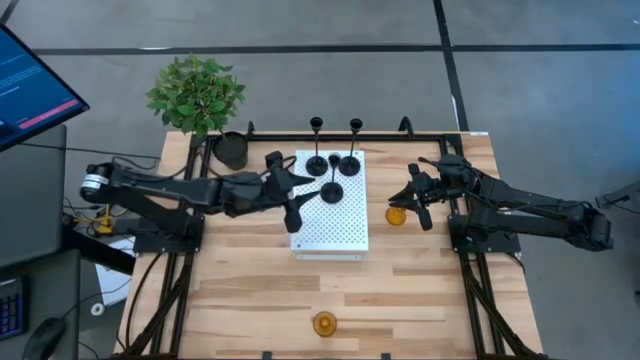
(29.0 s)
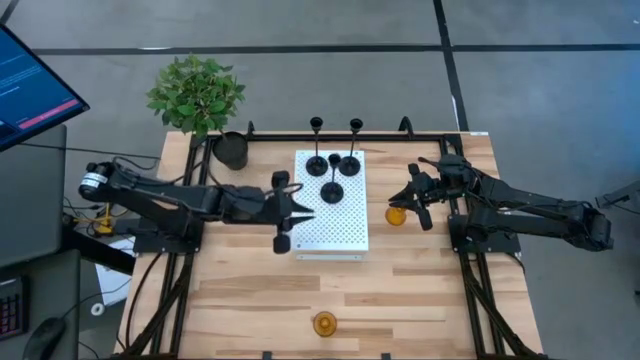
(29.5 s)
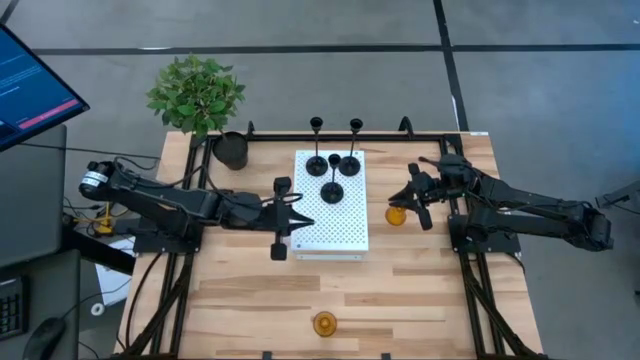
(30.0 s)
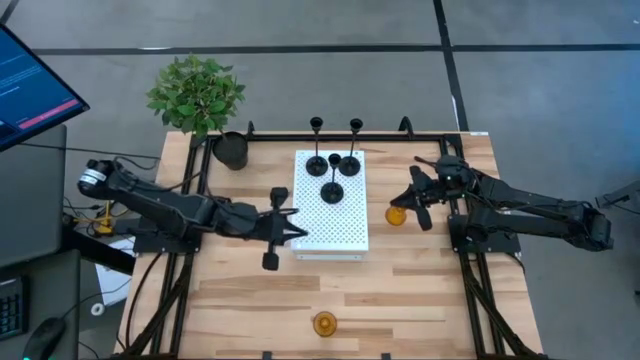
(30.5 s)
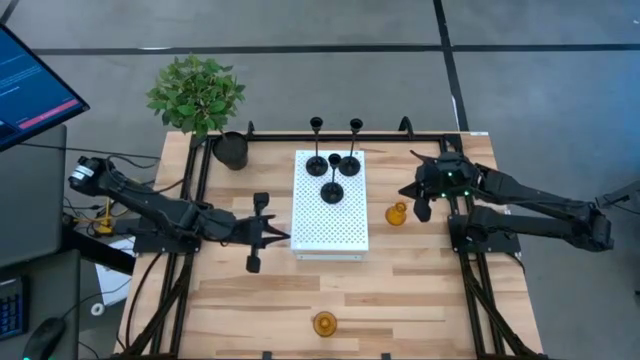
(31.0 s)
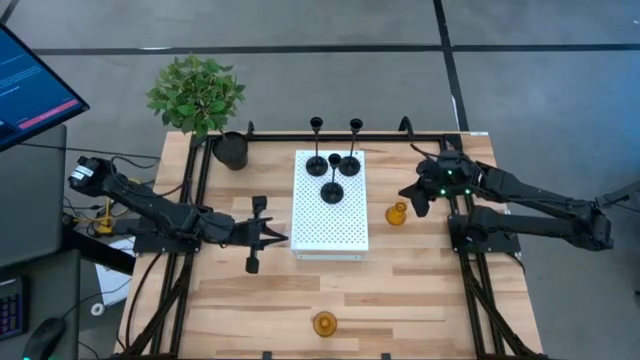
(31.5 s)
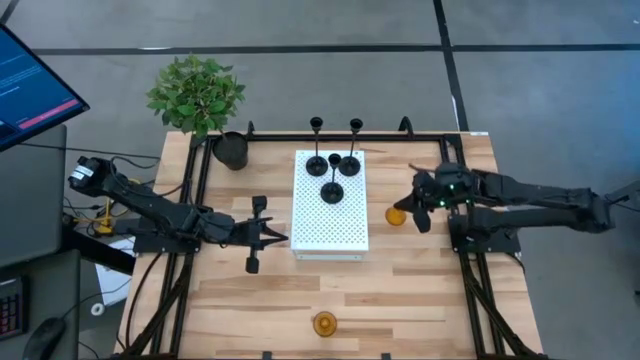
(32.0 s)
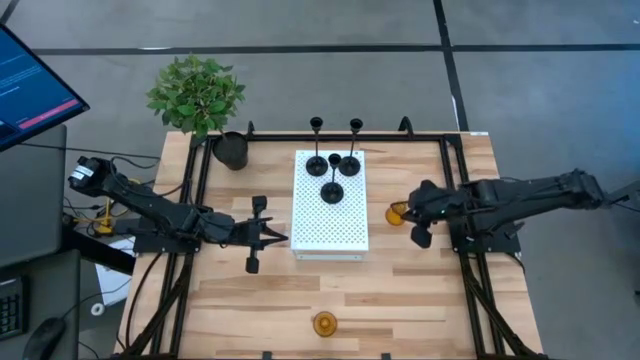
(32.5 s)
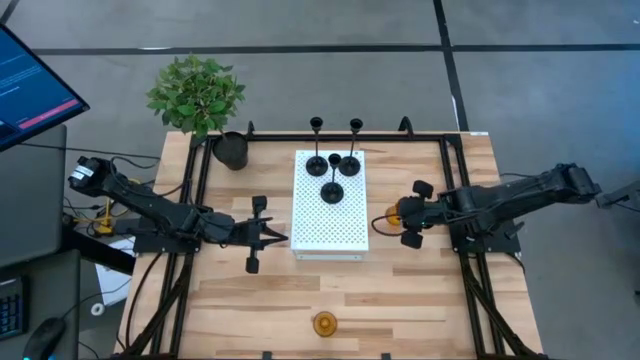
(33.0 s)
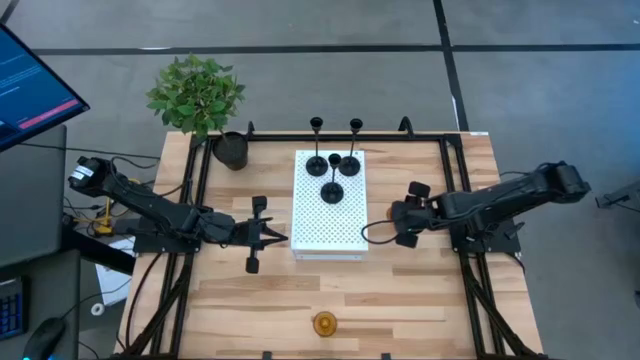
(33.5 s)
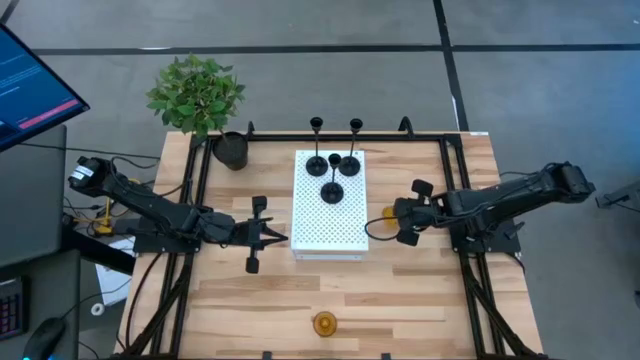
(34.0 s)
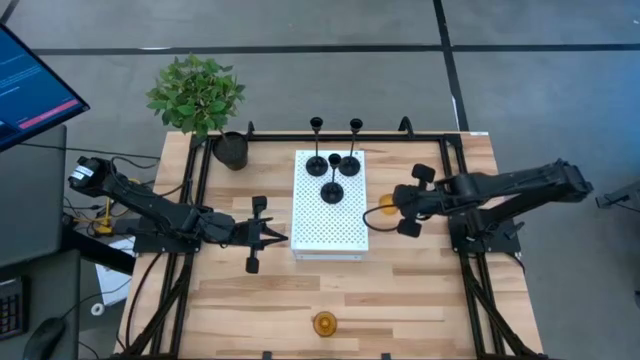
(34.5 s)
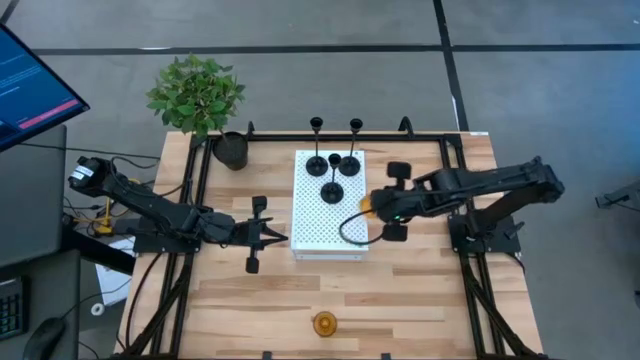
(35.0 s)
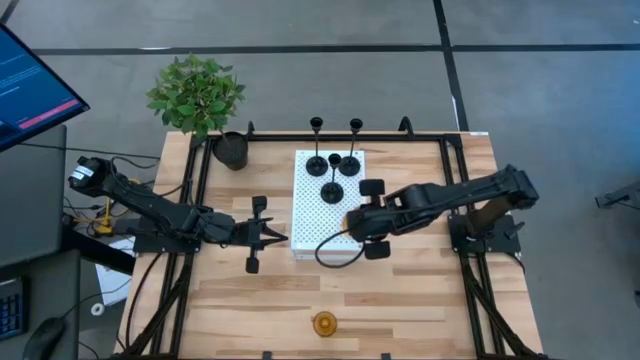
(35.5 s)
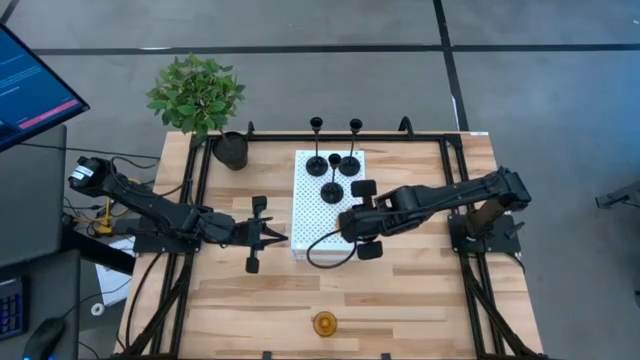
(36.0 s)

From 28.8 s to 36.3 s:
Task: Pick & Place candle stick holders
Put the top yellow glass candle holder on the shelf

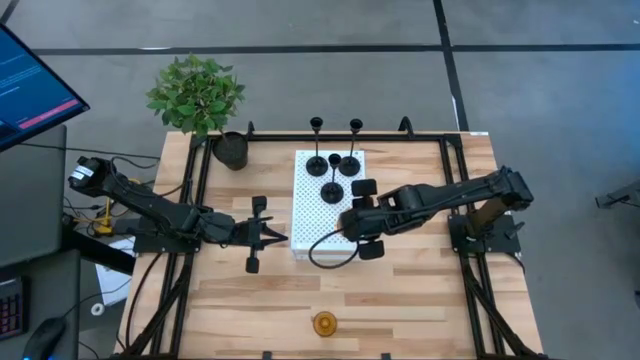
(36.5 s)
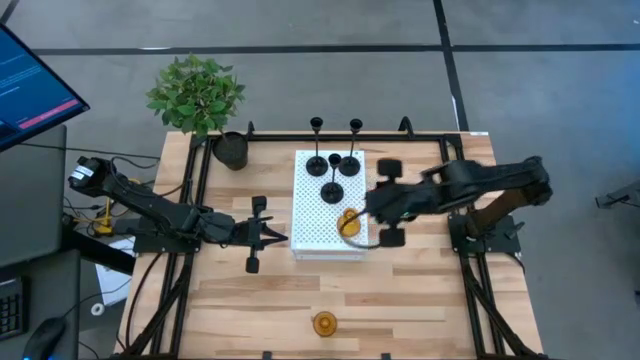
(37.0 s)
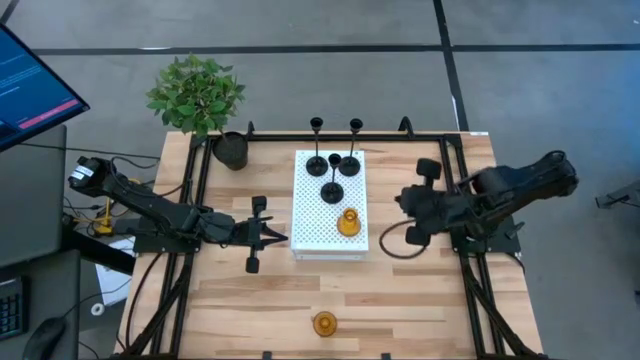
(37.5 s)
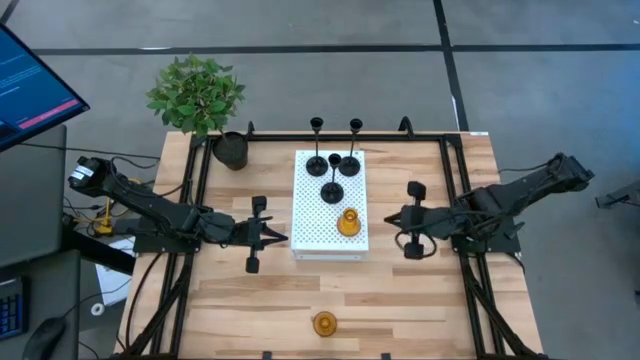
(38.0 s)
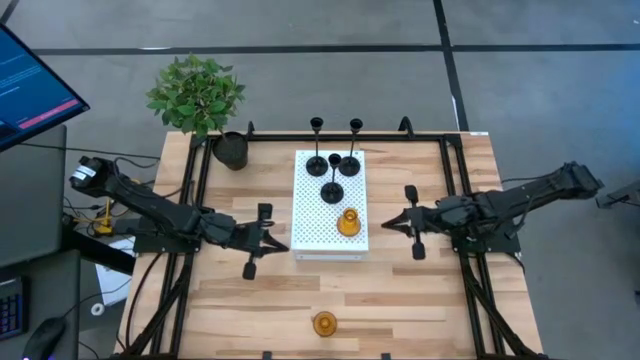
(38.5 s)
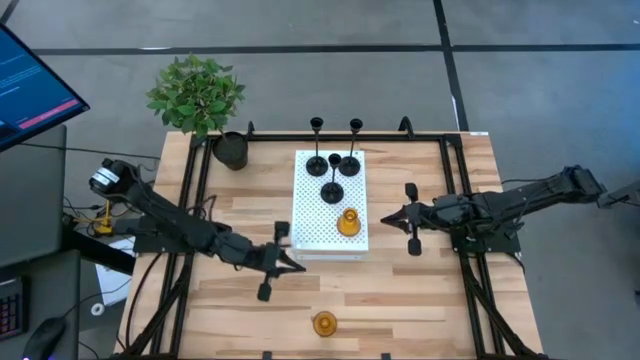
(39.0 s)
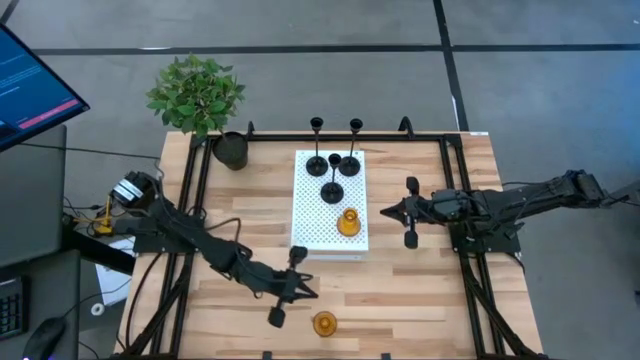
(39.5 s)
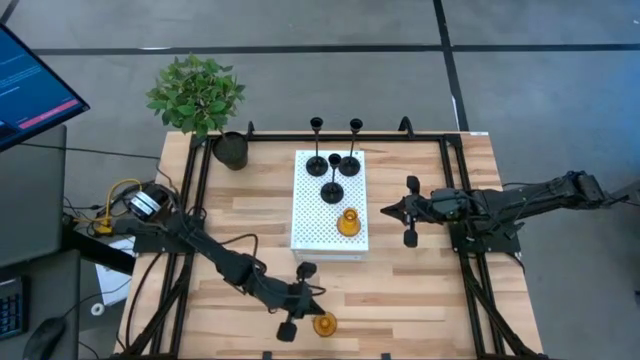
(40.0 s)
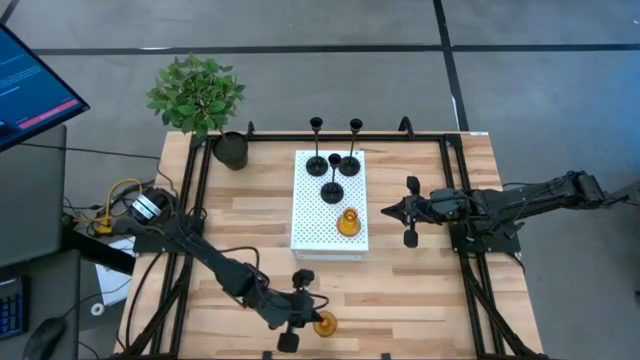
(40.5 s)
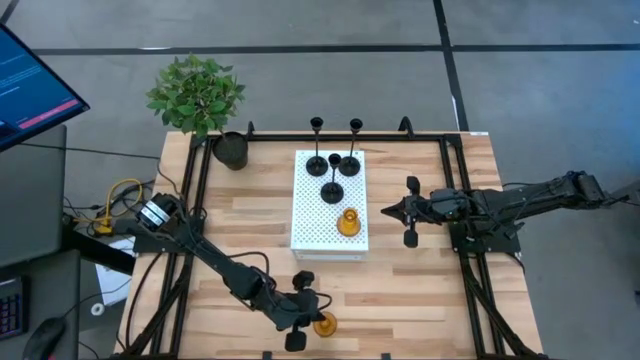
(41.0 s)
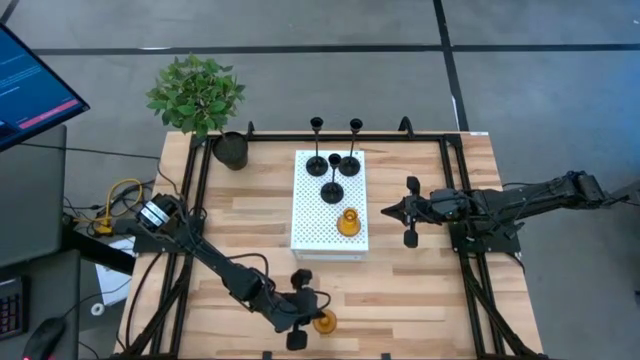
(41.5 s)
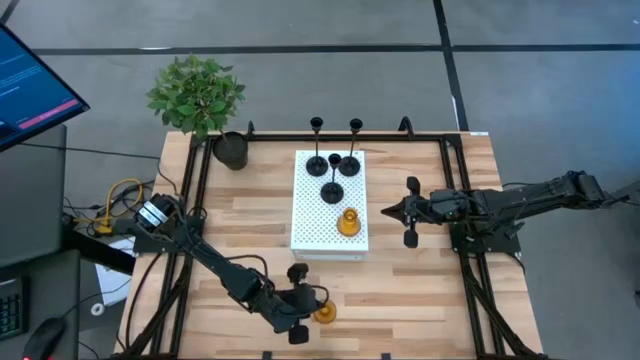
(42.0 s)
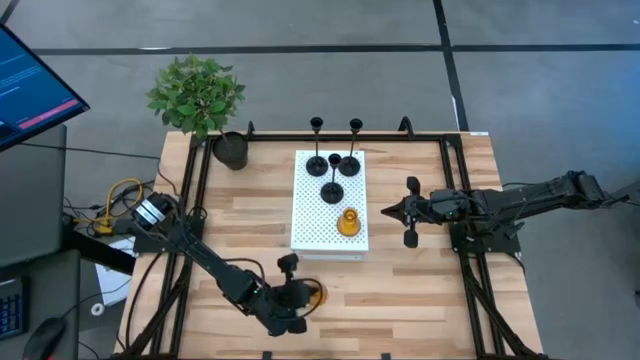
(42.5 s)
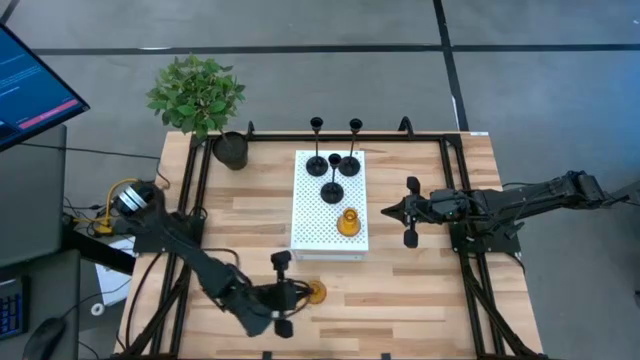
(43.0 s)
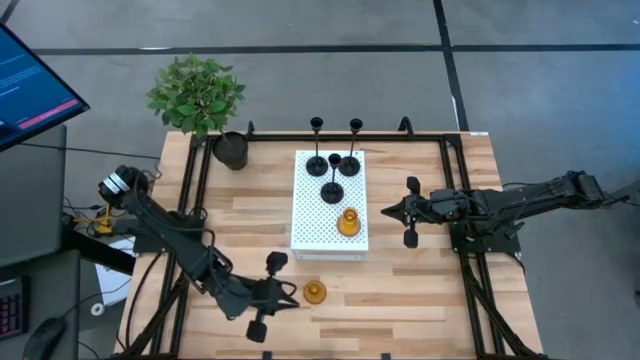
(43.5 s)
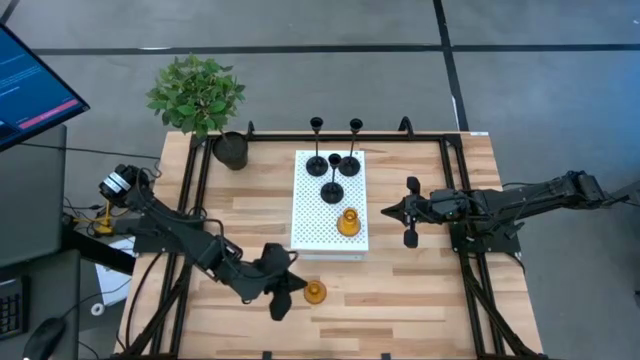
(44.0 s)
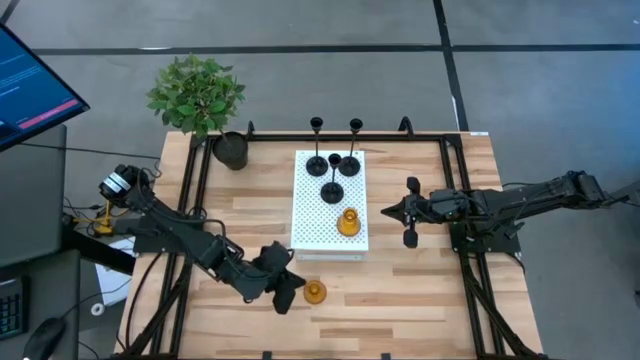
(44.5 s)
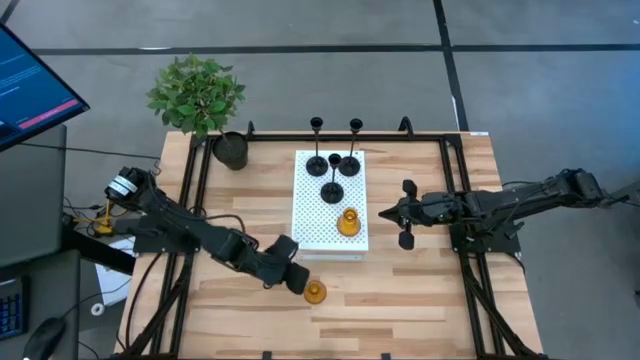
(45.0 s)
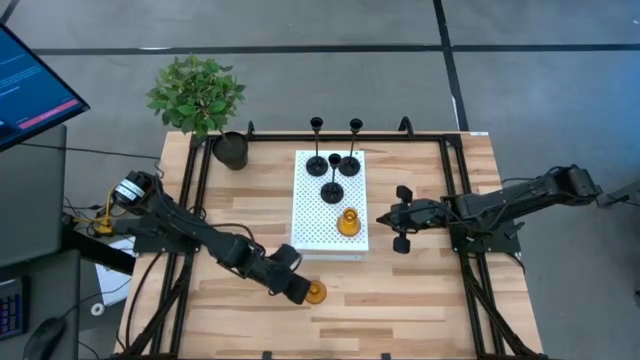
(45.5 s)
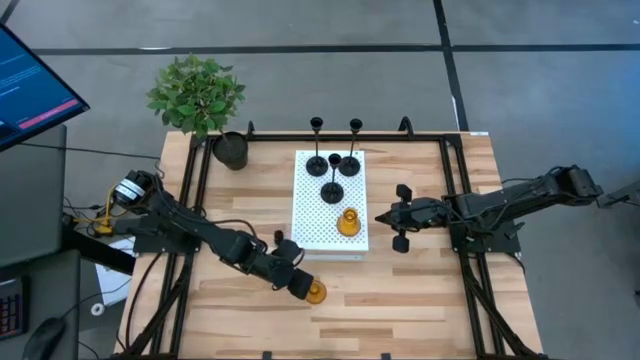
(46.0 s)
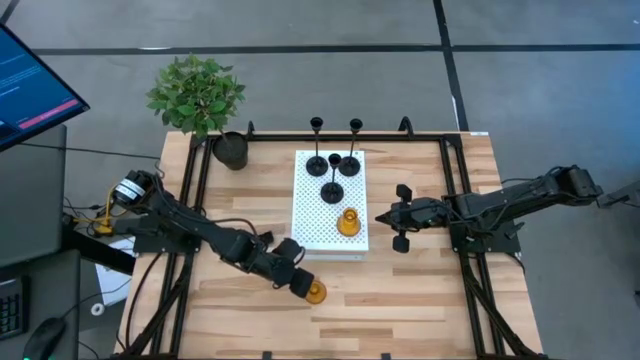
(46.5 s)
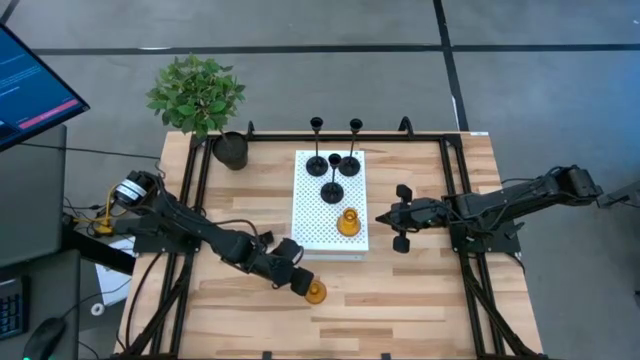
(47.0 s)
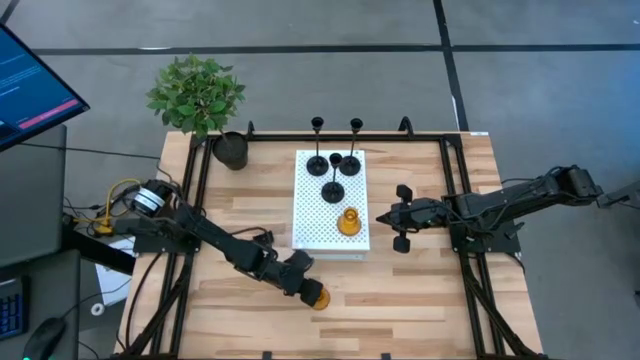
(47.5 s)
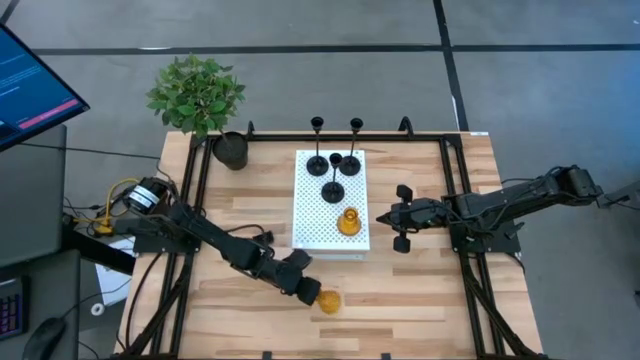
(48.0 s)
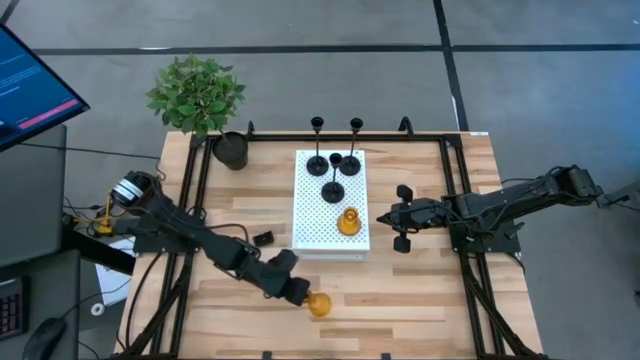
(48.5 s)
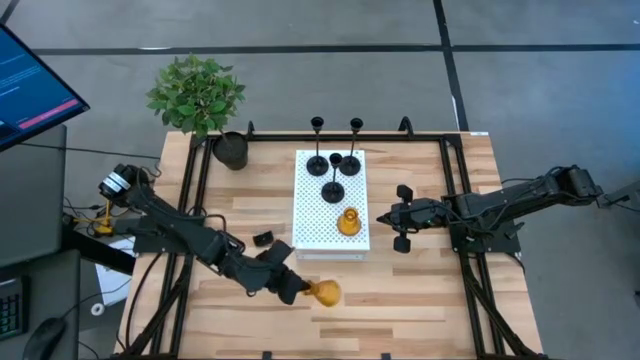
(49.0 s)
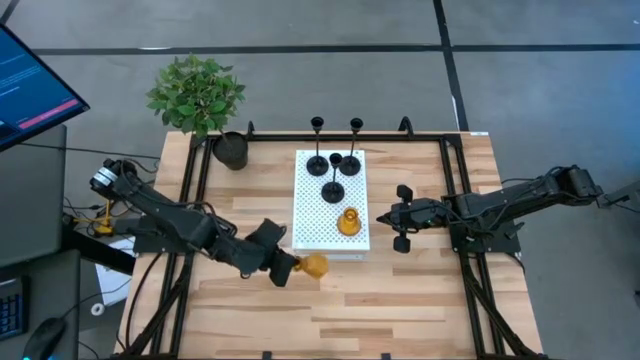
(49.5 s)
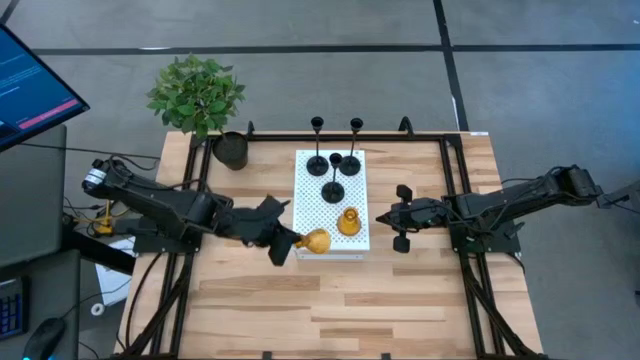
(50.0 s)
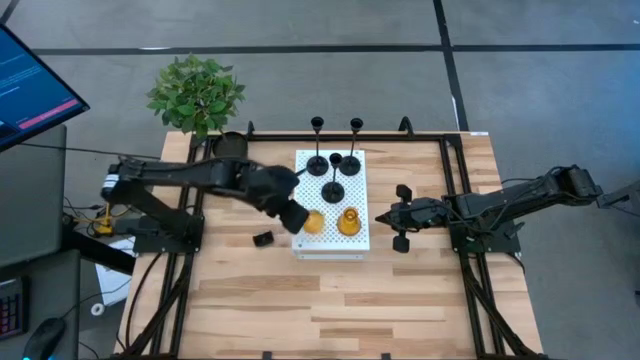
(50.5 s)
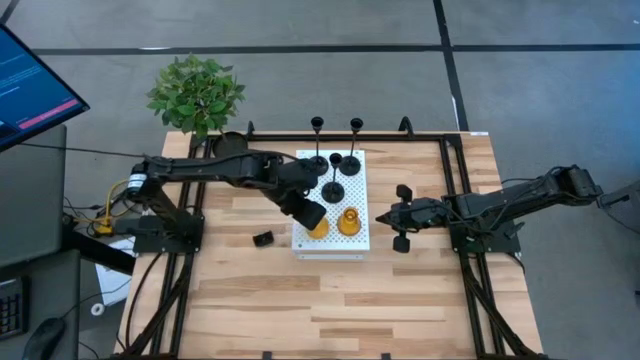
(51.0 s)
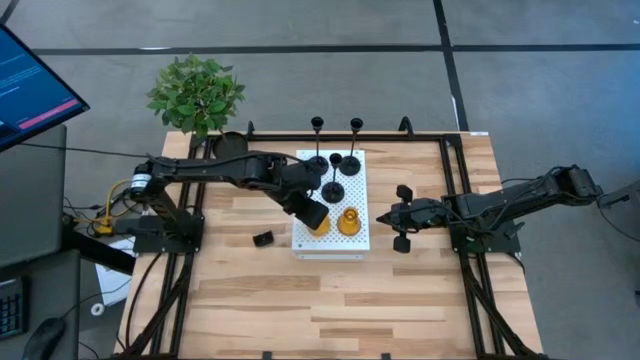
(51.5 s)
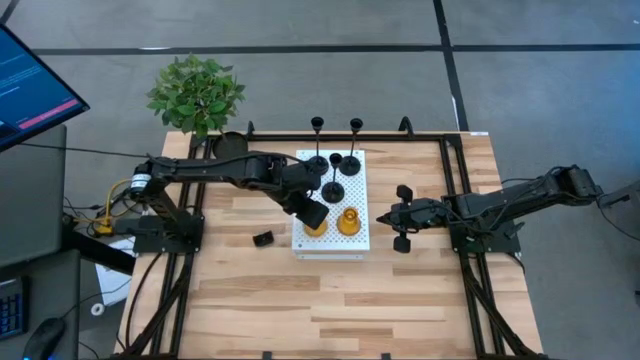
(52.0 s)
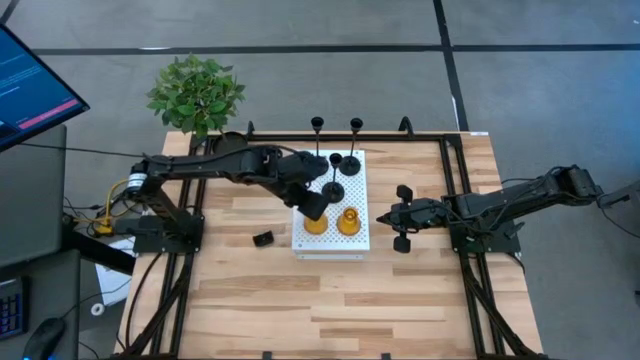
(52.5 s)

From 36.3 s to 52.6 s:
Put the yellow glass candle holder on the shelf
